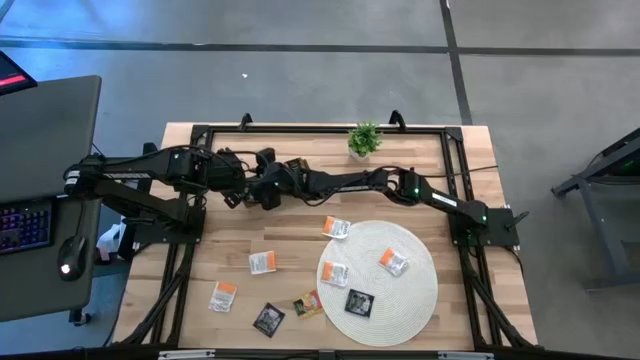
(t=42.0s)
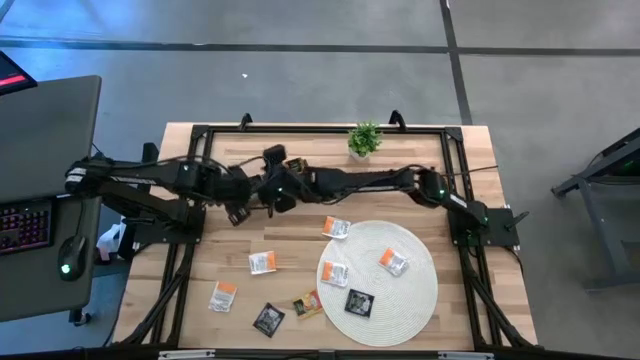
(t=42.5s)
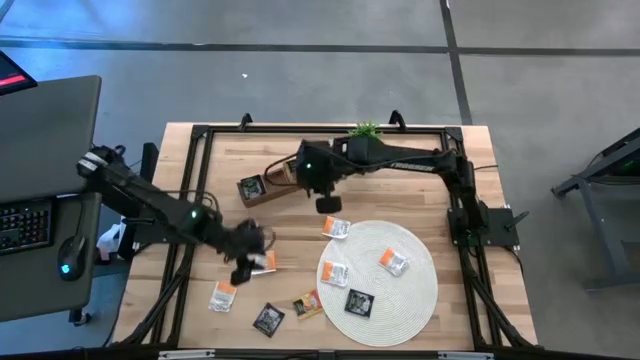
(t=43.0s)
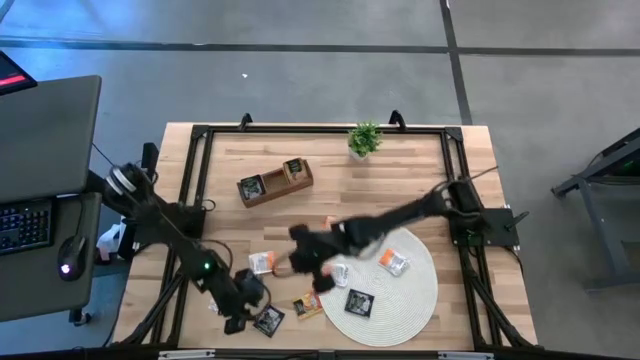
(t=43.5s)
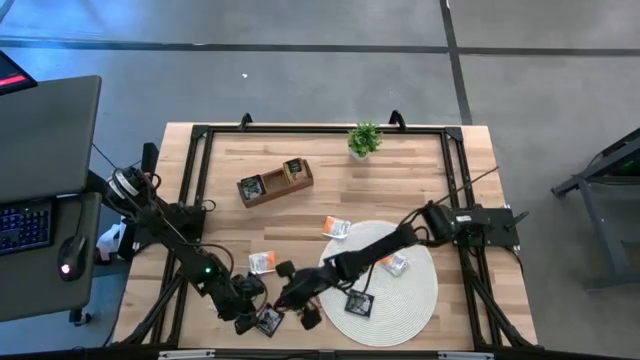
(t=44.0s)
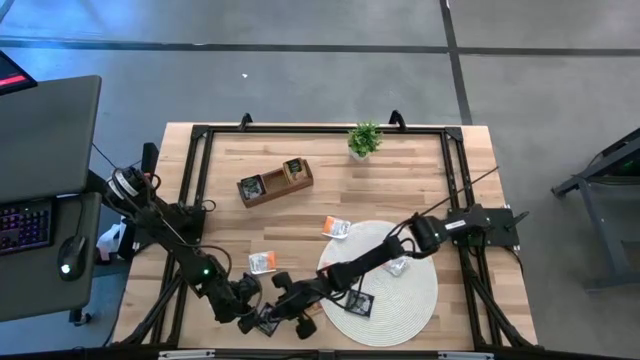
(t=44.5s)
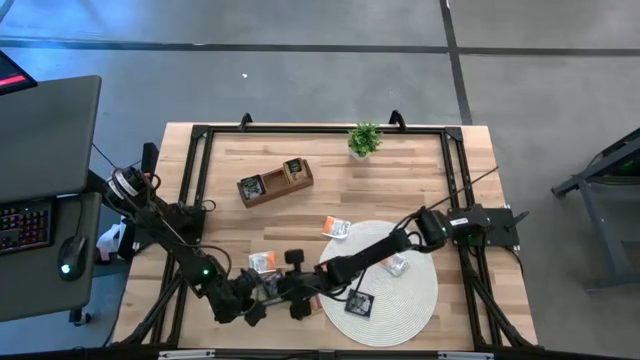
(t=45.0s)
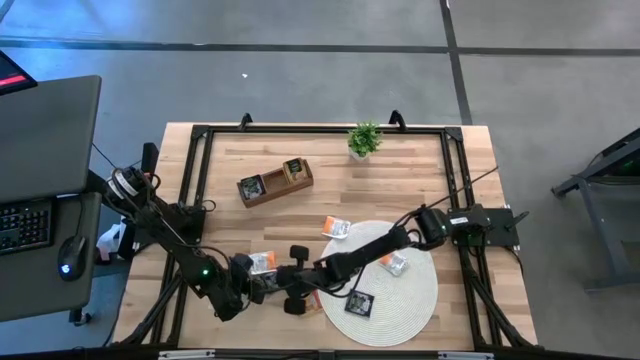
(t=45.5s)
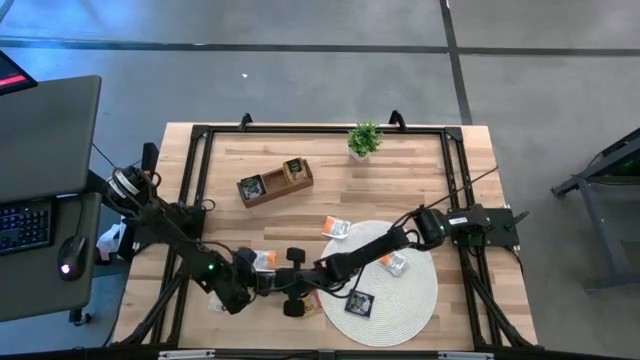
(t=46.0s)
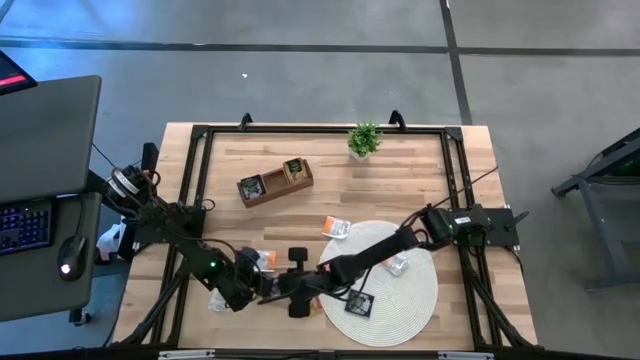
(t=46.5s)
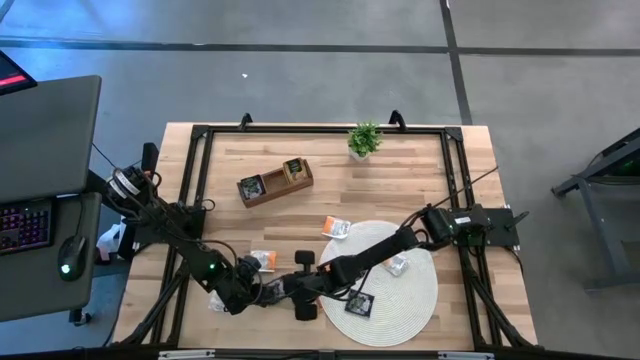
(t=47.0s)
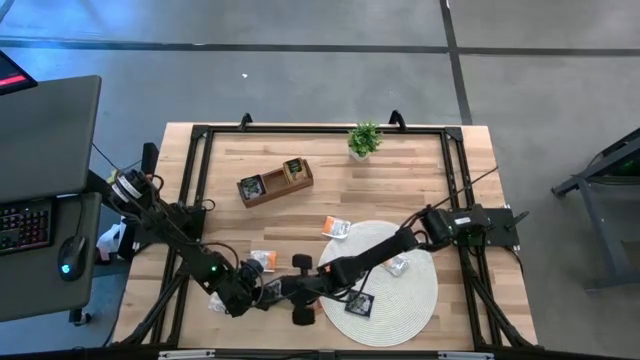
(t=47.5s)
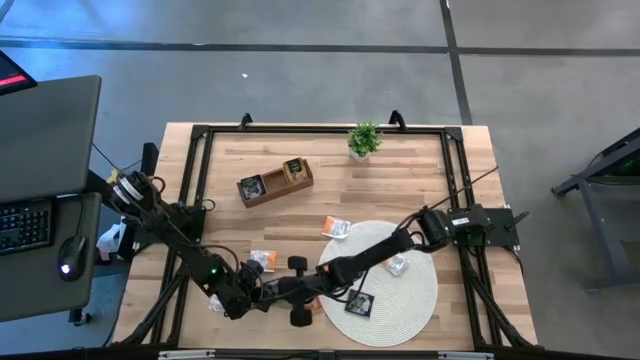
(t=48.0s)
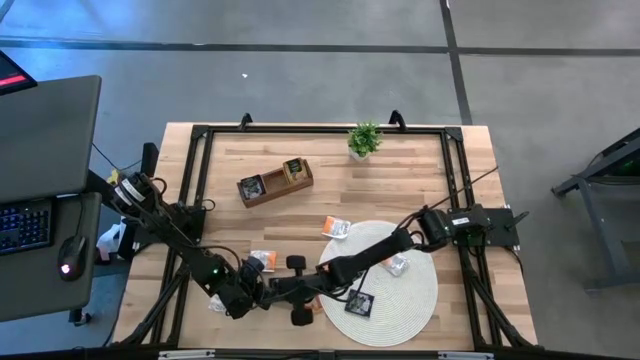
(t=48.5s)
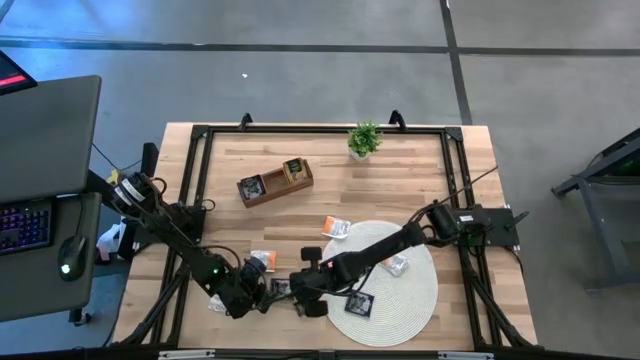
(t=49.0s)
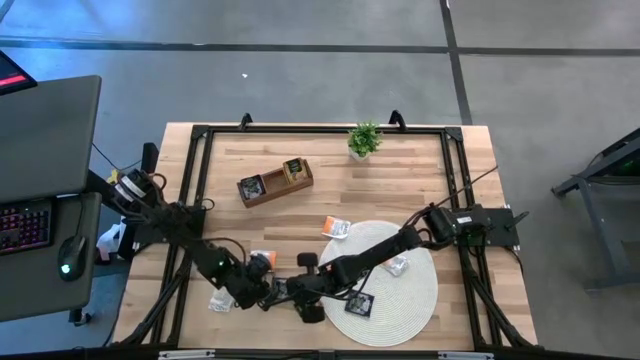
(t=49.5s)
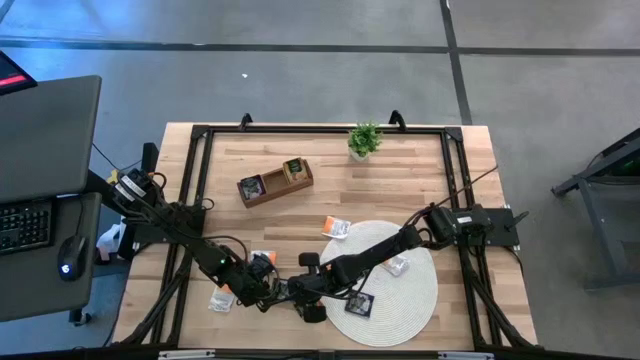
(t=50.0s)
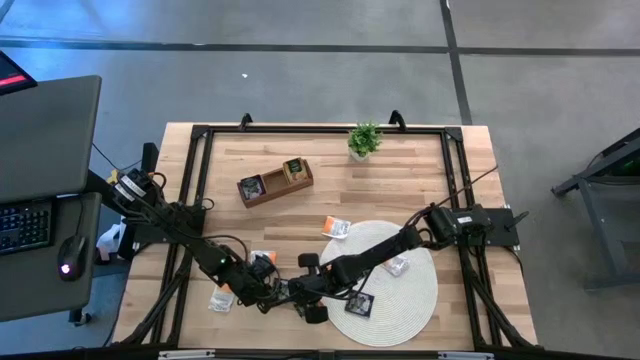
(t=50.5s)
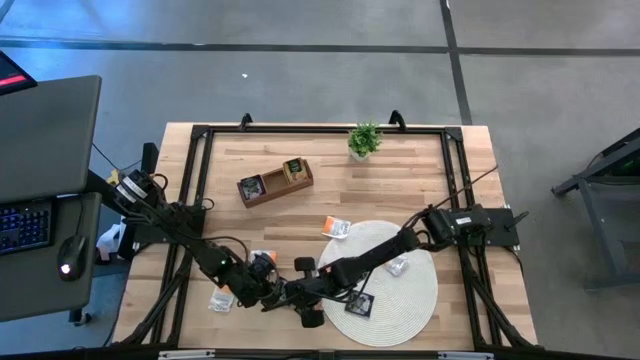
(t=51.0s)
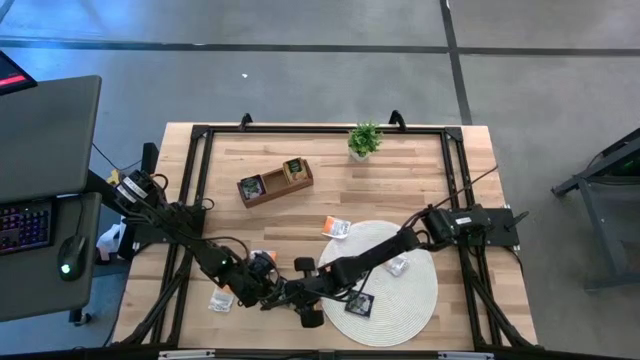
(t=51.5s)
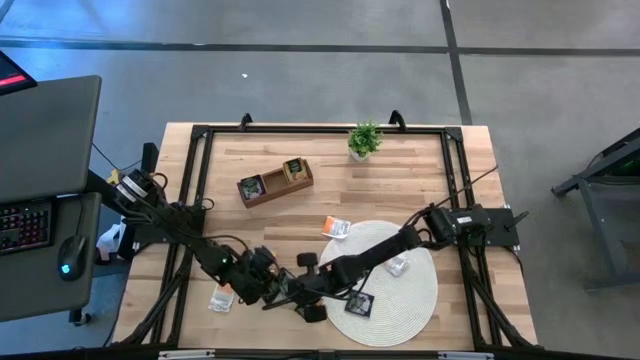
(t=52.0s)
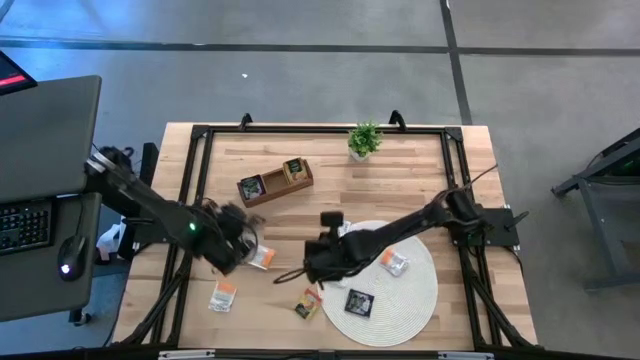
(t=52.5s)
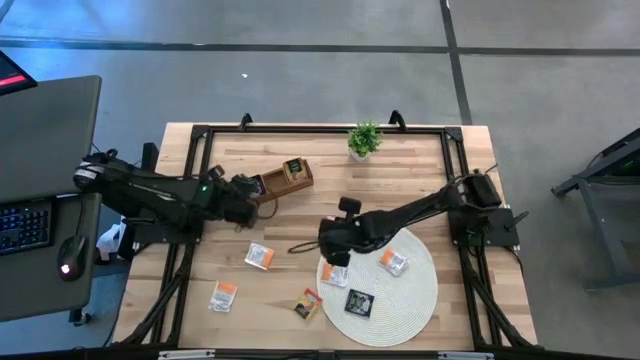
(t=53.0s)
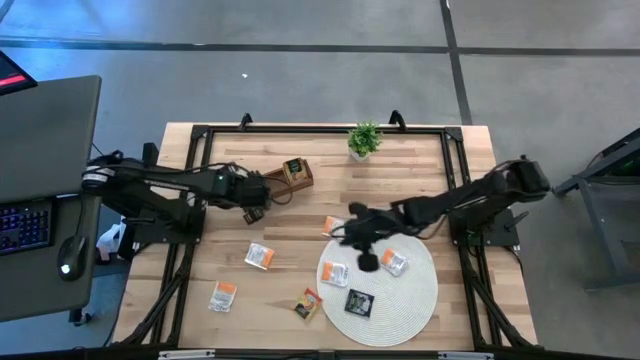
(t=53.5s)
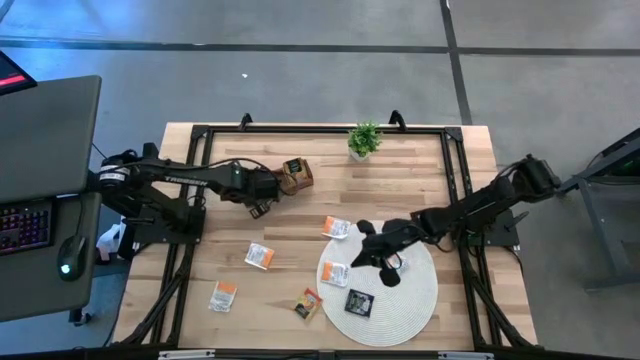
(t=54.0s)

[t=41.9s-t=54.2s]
Task: Pick & Place Tea
Put the violet tea bag into the left section of the wooden organizer

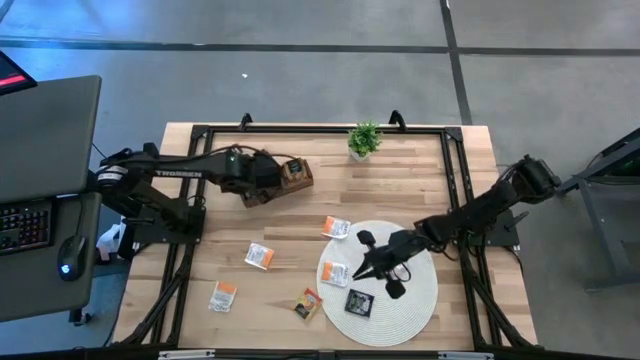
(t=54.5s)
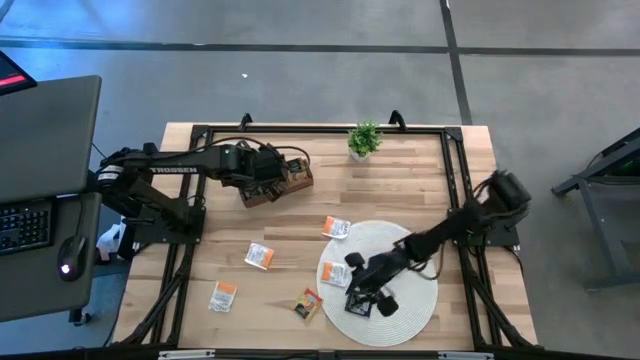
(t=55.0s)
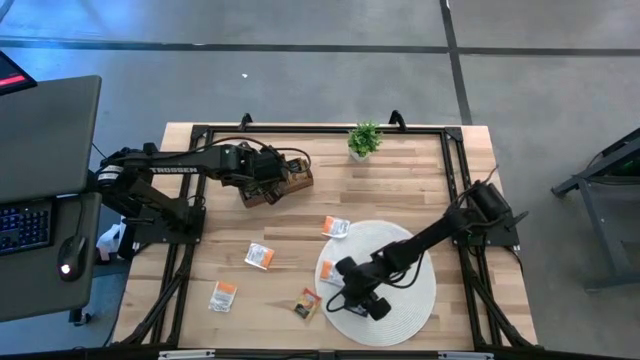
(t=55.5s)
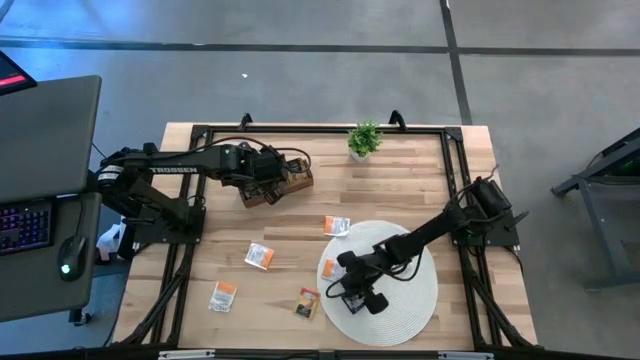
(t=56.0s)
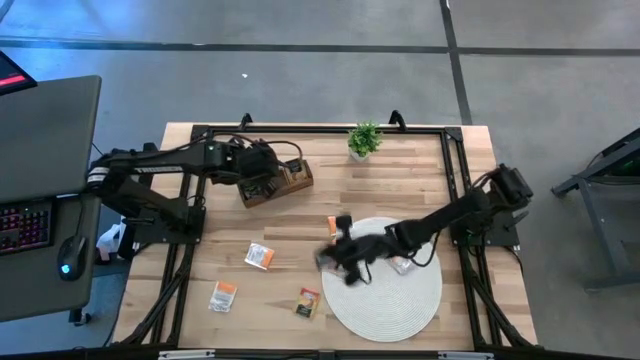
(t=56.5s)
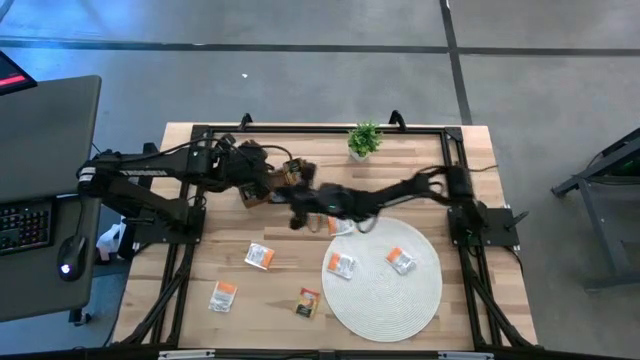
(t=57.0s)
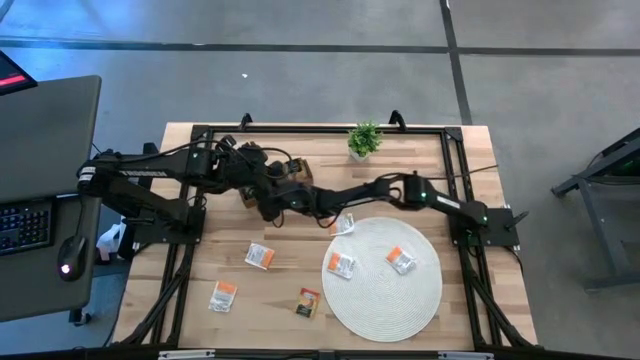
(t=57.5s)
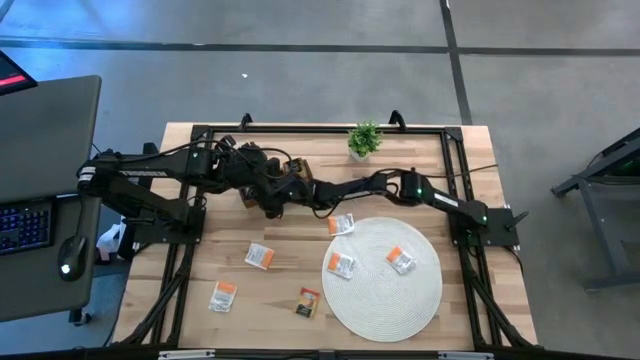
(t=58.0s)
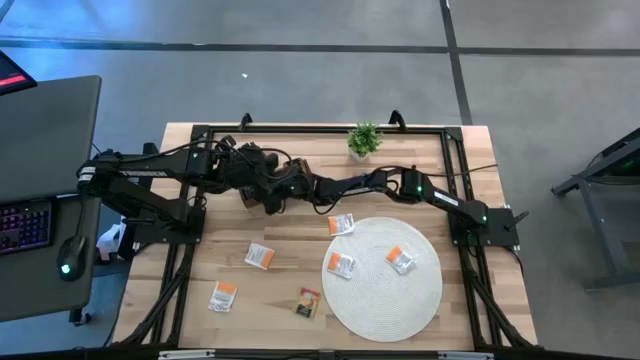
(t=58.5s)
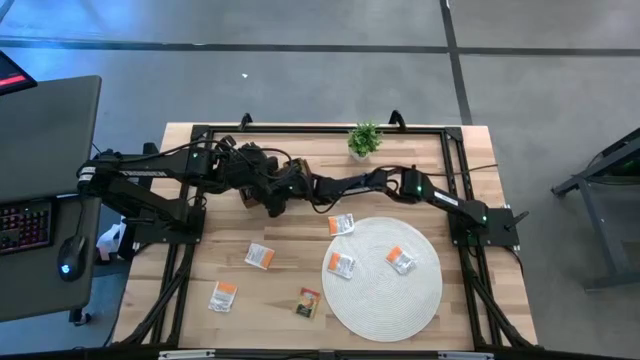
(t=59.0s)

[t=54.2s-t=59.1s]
Put the violet tea bag into the left section of the wooden organizer

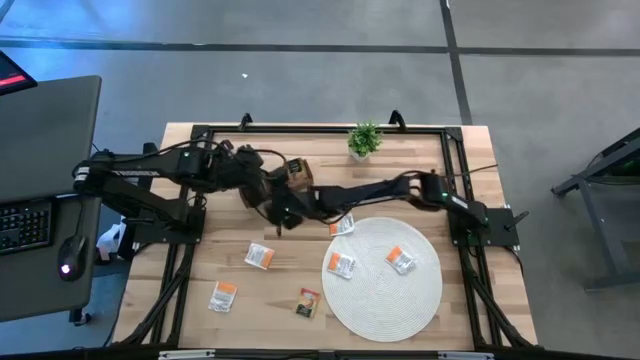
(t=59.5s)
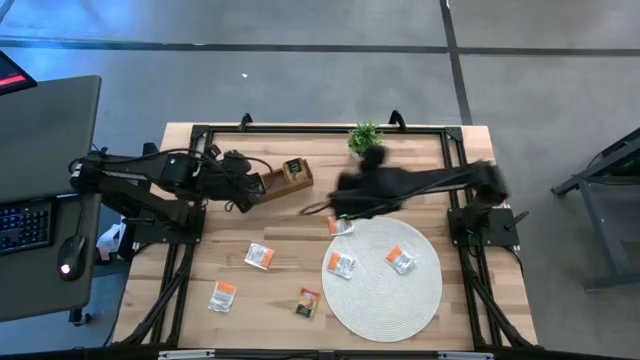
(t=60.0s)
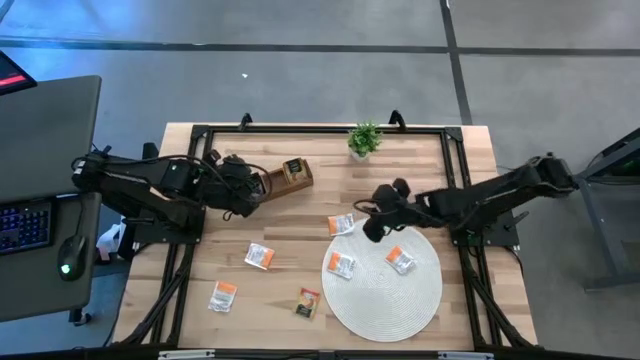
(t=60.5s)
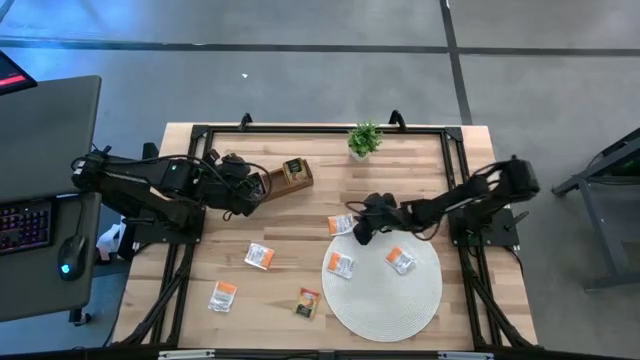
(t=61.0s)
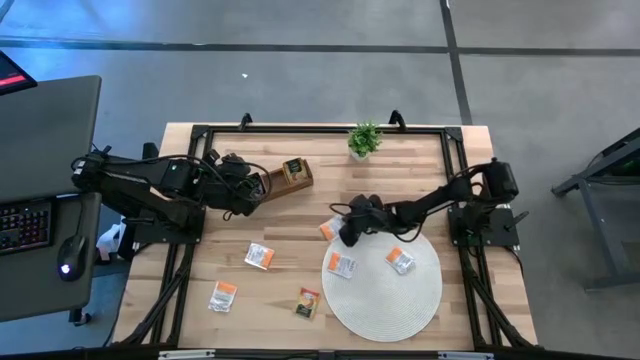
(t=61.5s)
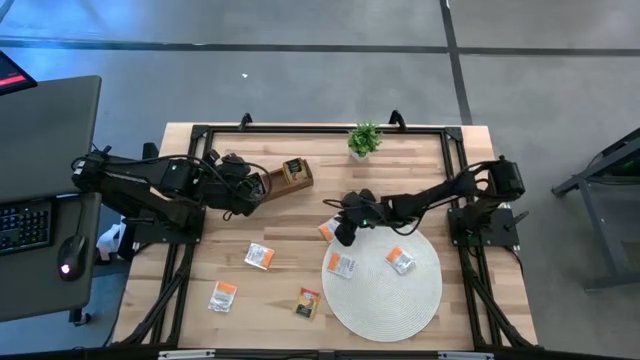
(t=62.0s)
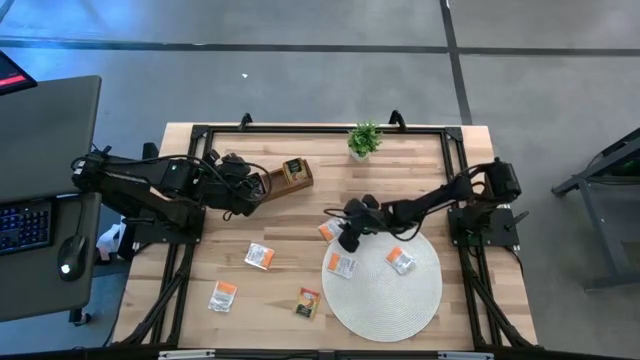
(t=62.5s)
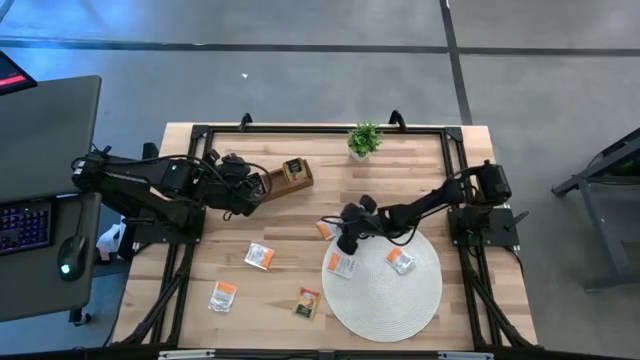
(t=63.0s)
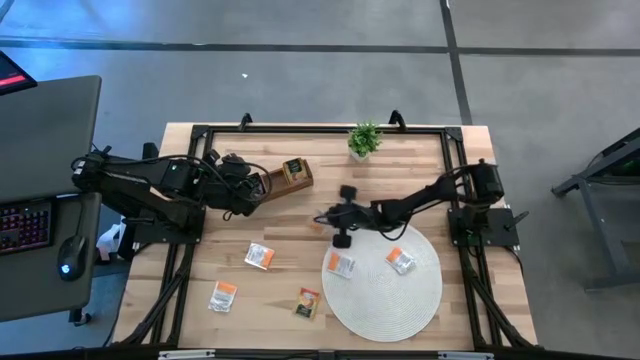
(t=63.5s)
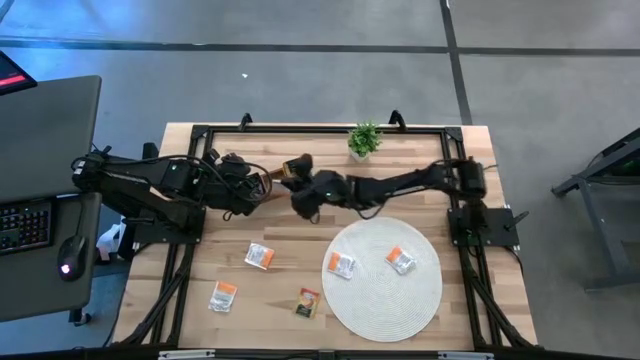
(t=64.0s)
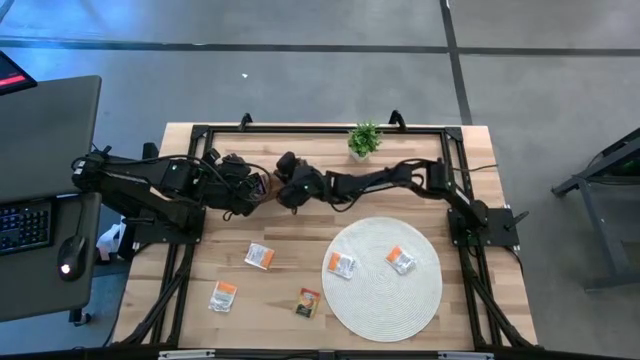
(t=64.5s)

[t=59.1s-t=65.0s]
Put the white tea bag into the middle section of the wooden organizer
